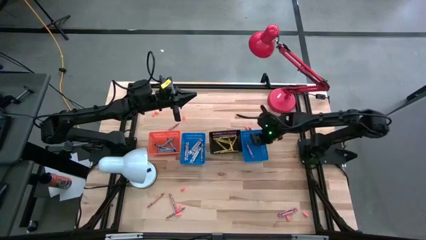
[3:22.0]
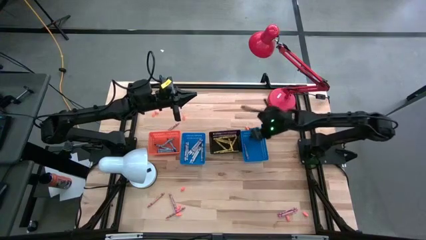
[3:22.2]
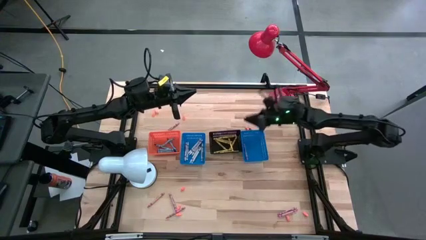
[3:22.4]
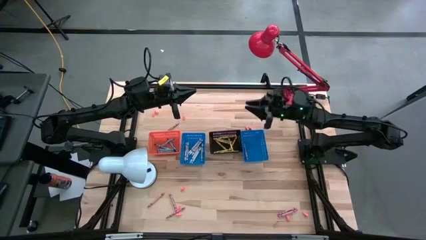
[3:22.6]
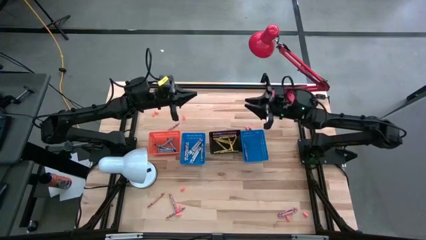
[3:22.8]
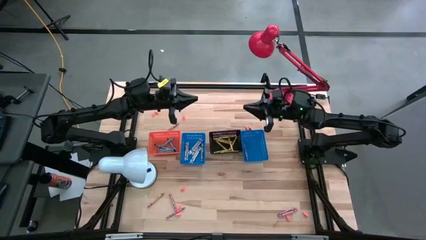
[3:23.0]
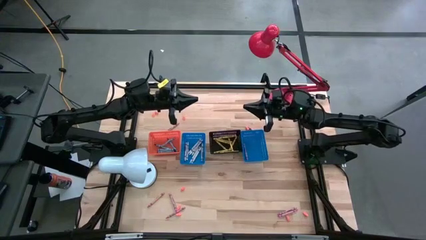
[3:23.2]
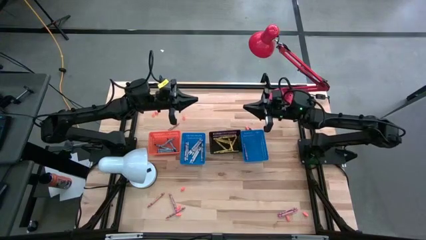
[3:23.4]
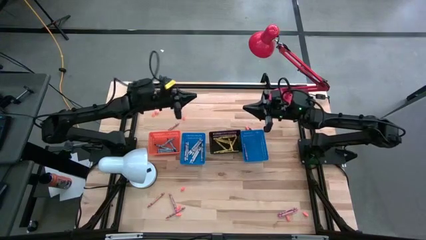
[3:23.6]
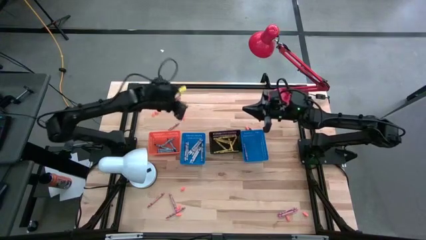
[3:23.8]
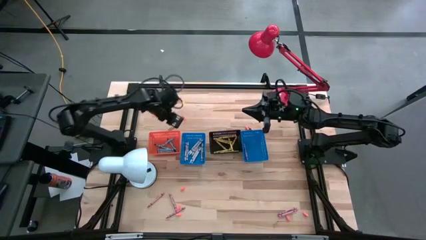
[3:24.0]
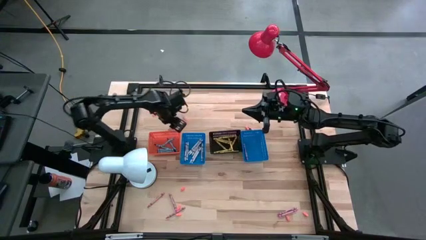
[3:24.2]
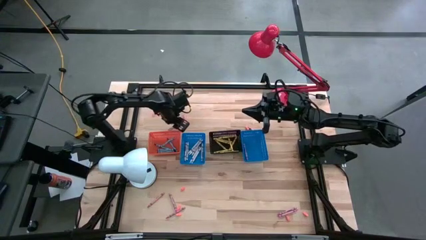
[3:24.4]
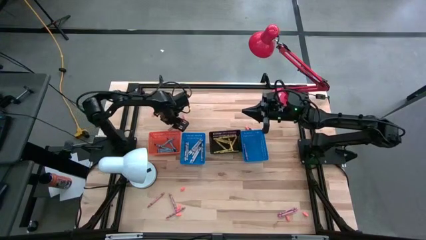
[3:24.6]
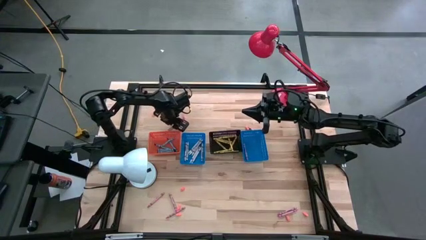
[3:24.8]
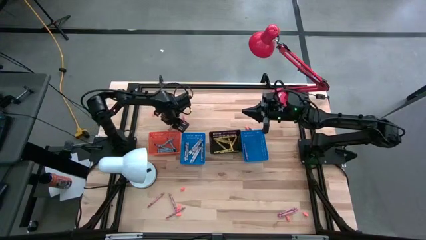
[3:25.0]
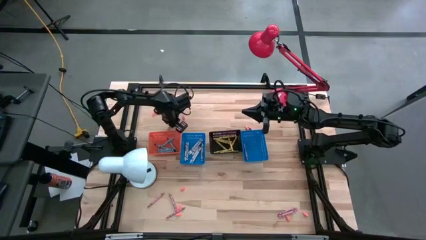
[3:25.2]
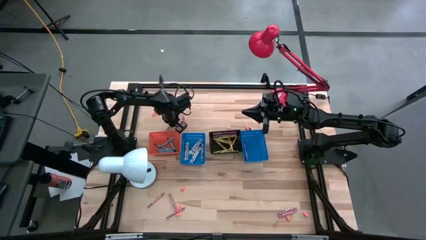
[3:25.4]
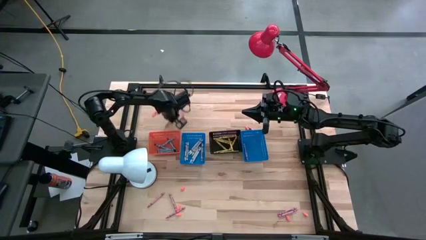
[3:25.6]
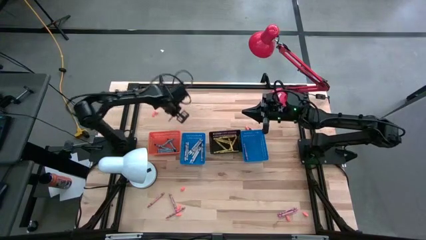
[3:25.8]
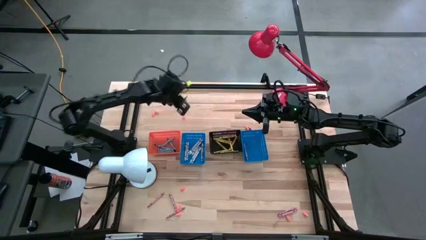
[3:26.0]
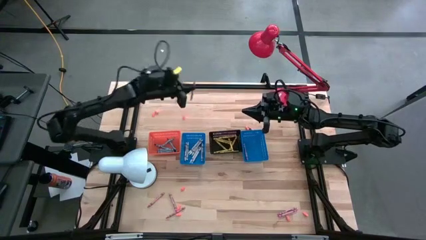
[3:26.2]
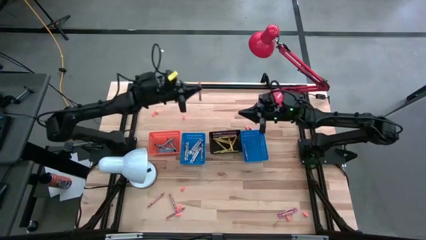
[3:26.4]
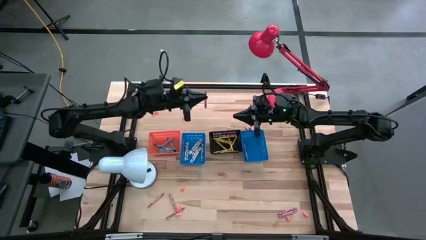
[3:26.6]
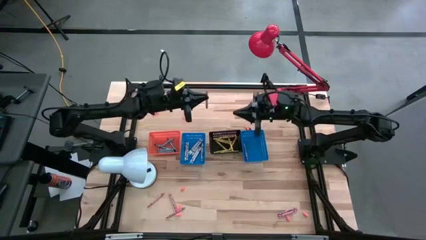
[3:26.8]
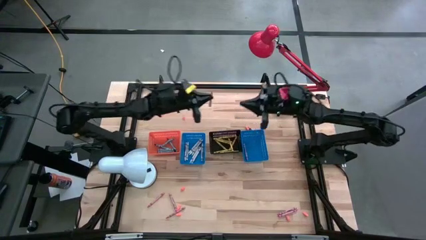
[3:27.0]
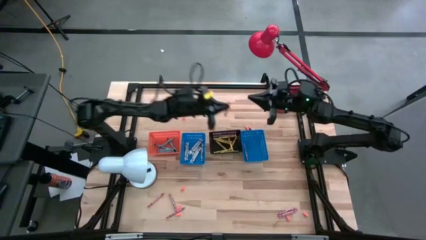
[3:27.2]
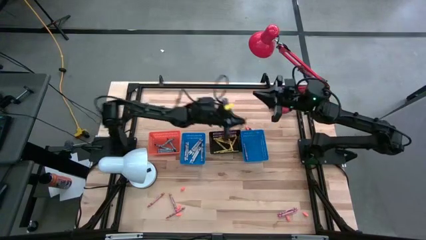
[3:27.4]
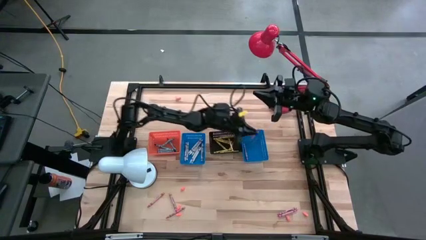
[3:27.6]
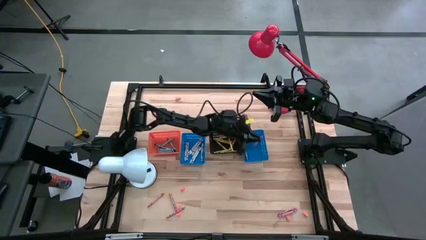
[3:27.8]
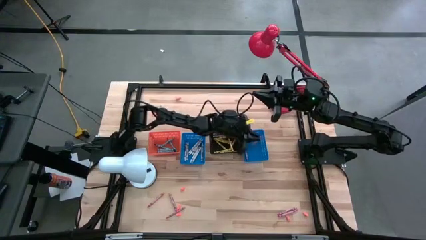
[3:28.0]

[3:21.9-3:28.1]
Task: Sort crayons
Put the pink crayon into the right blue bin

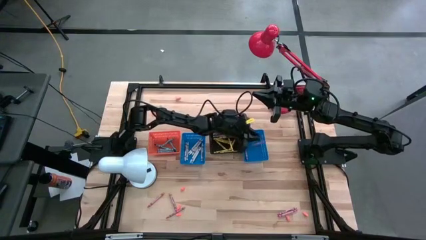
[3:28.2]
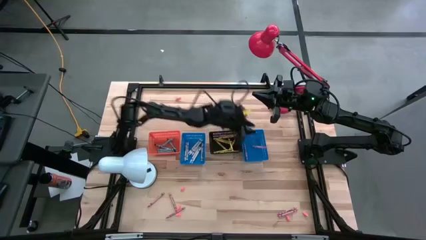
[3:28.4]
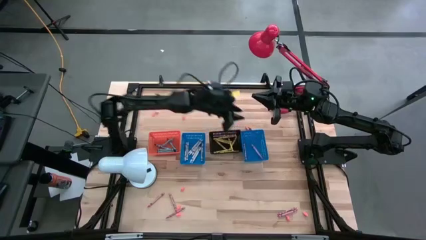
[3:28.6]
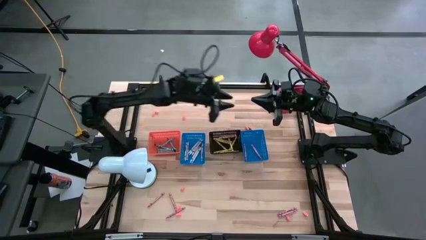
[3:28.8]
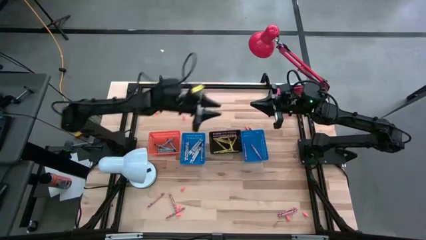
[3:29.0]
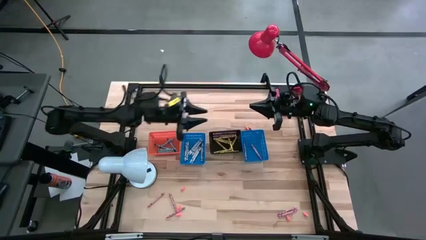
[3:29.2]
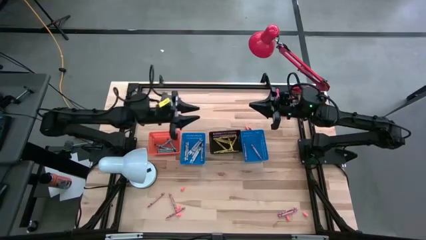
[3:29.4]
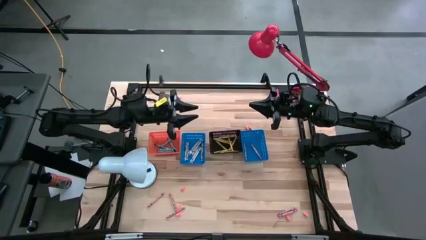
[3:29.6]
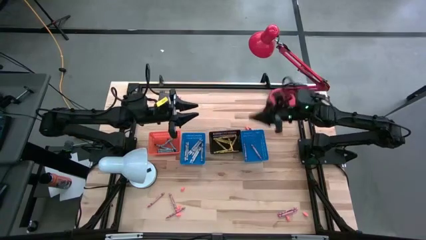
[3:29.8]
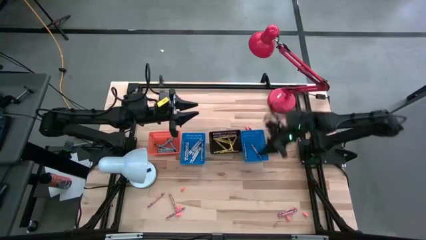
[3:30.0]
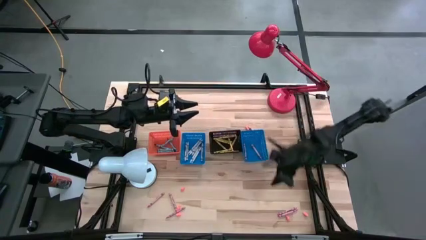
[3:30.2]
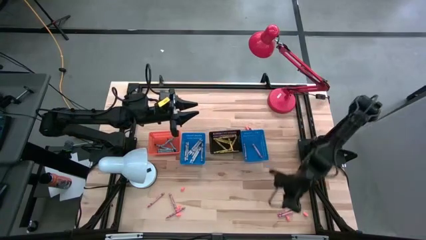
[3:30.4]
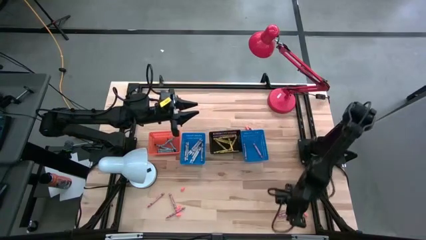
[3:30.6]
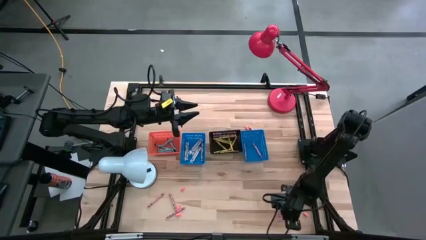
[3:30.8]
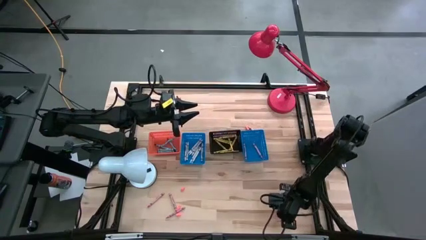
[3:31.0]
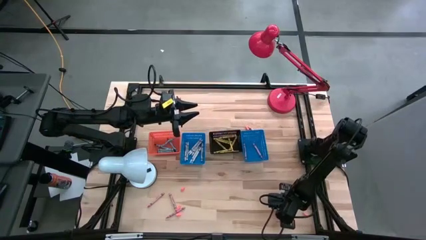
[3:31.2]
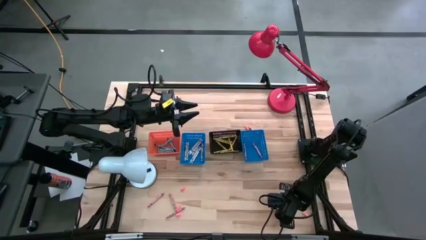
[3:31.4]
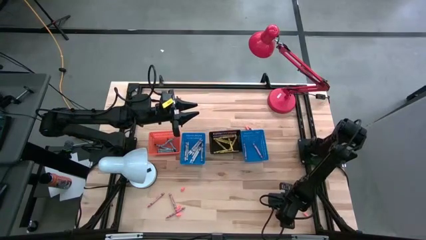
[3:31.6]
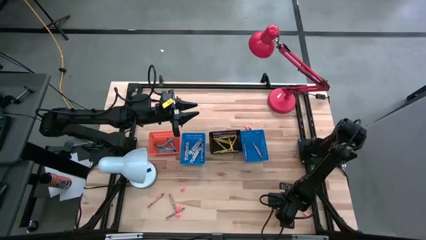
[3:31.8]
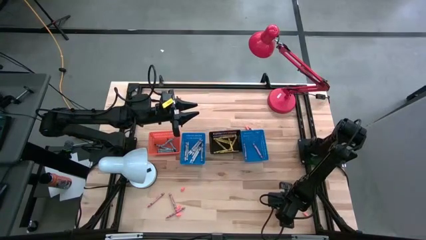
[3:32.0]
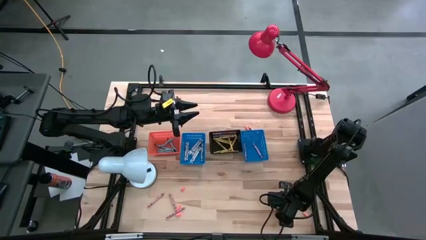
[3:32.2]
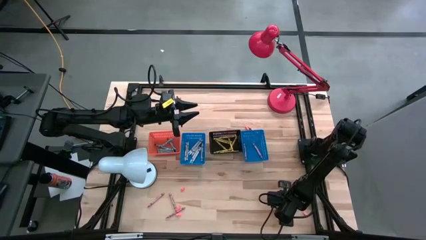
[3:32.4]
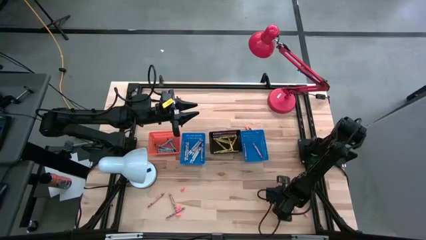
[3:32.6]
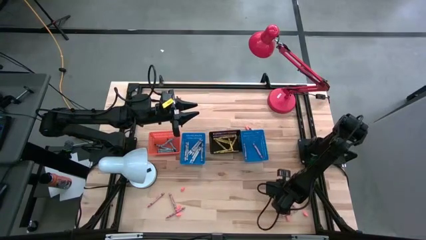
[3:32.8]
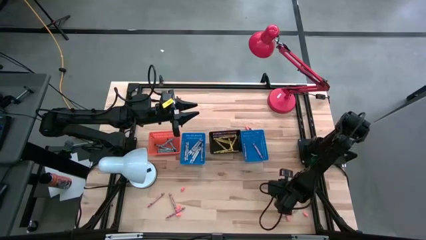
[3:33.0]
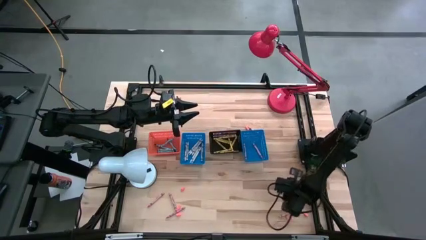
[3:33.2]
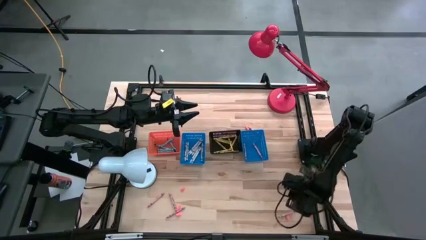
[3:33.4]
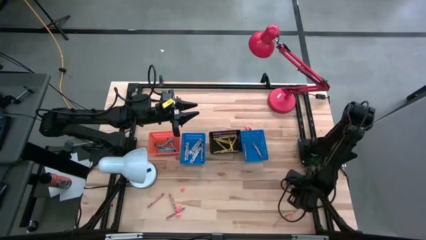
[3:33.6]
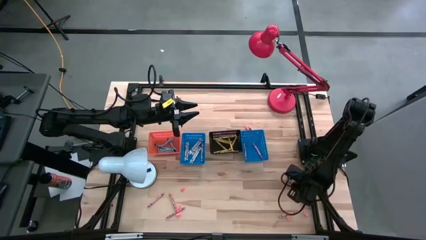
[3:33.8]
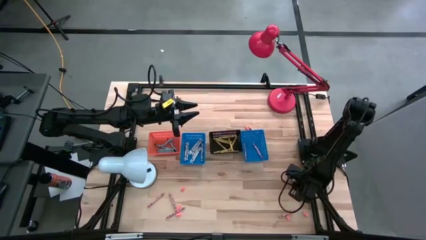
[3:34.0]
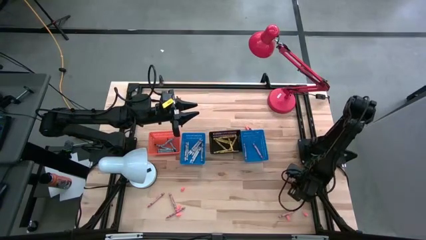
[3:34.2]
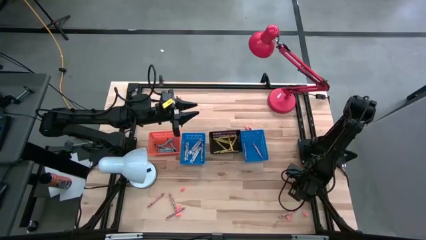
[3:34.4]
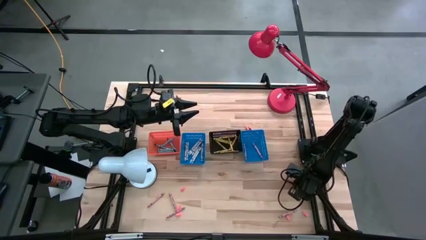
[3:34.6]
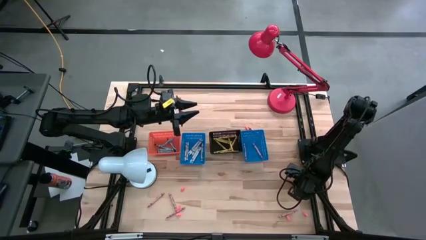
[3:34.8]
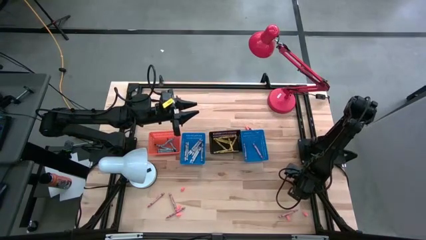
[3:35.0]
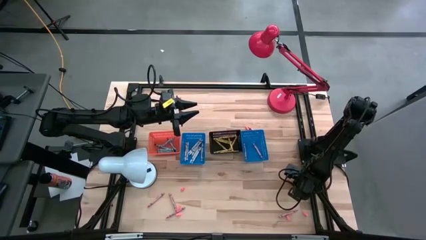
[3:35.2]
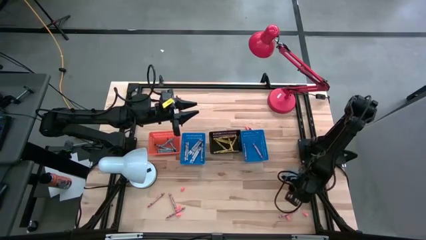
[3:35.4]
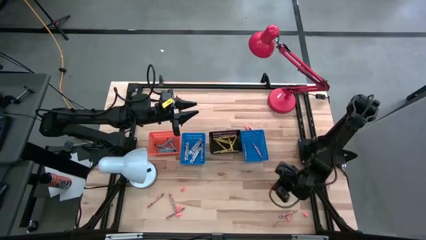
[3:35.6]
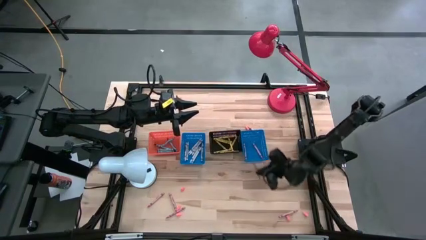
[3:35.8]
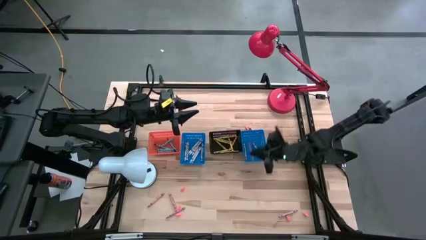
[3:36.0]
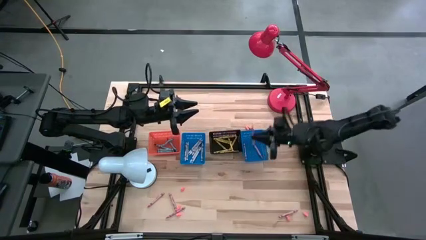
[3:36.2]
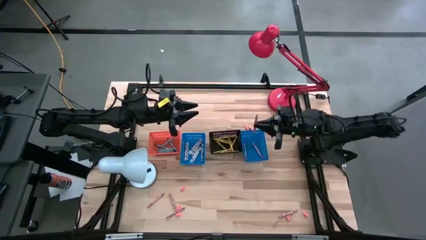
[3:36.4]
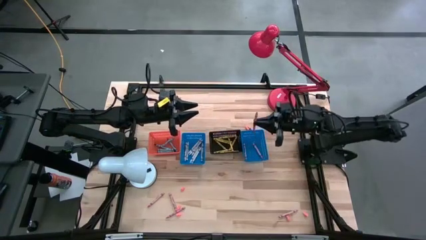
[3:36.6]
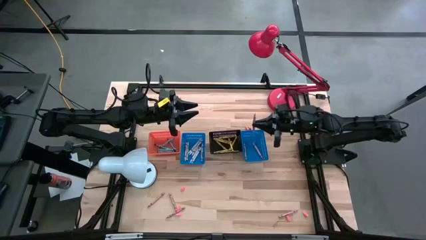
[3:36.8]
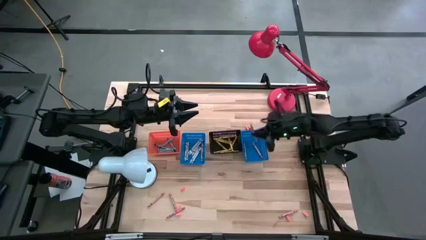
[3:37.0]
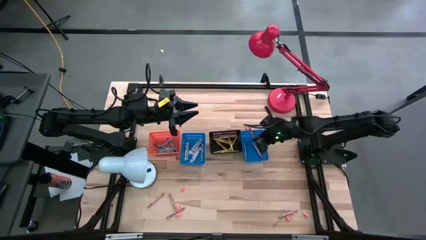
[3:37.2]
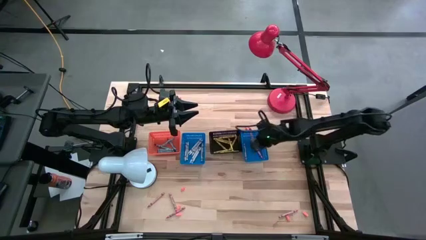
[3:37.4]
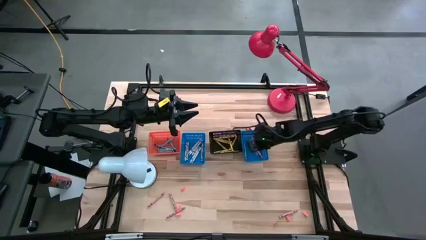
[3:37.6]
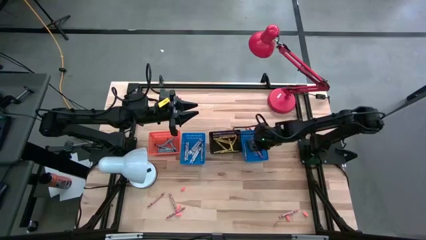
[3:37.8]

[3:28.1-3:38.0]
Put the pink crayon into the right blue bin
